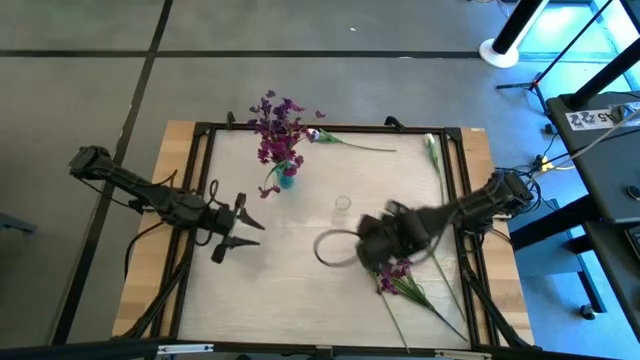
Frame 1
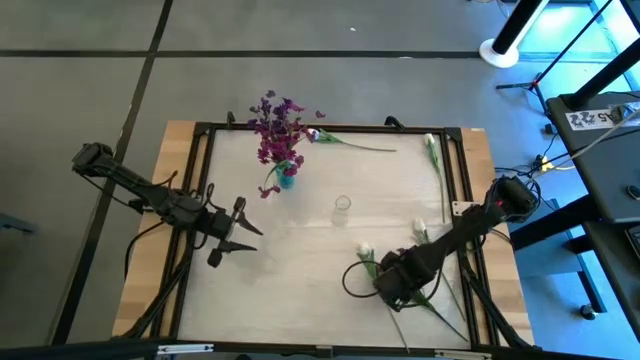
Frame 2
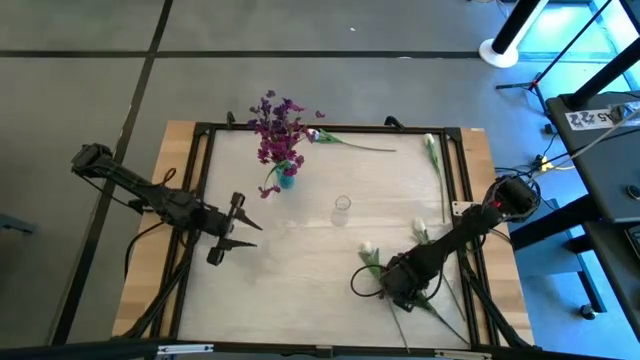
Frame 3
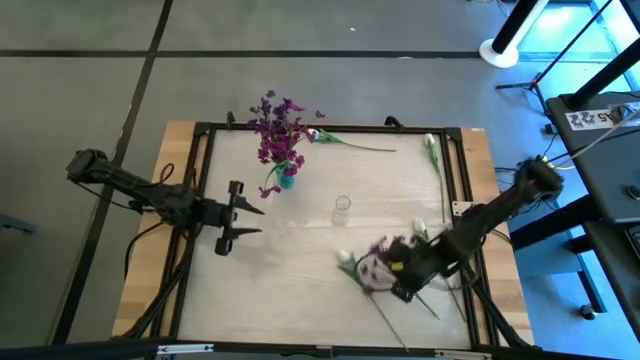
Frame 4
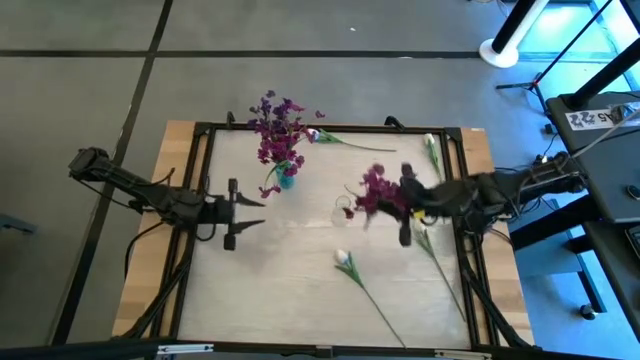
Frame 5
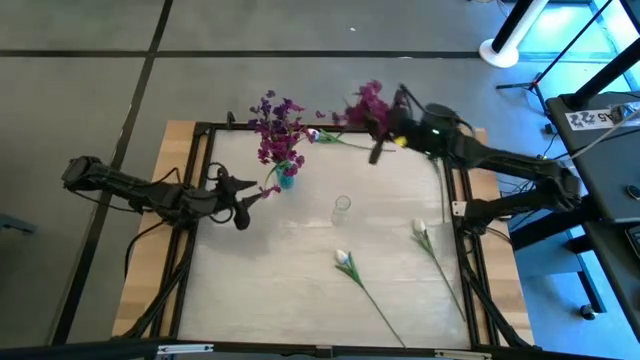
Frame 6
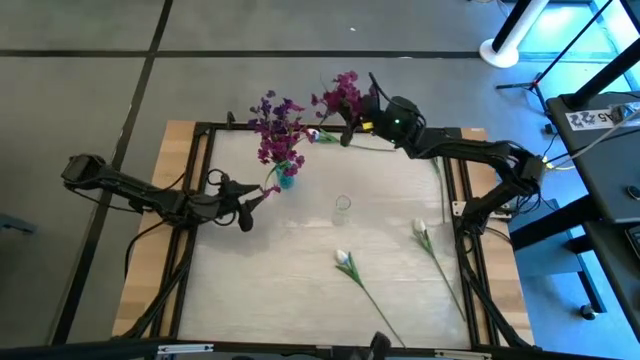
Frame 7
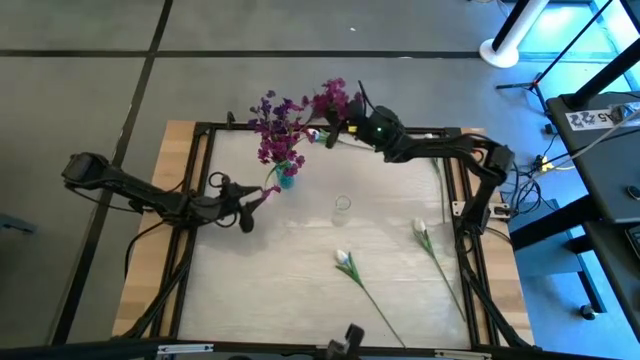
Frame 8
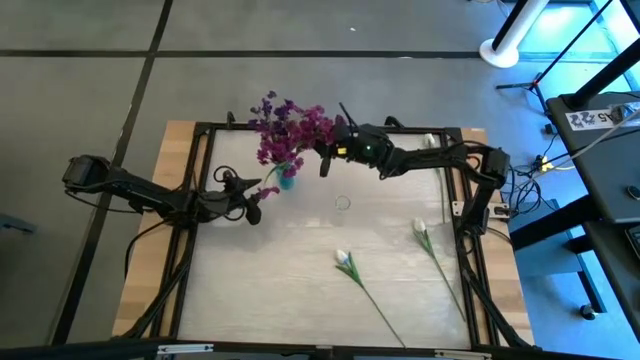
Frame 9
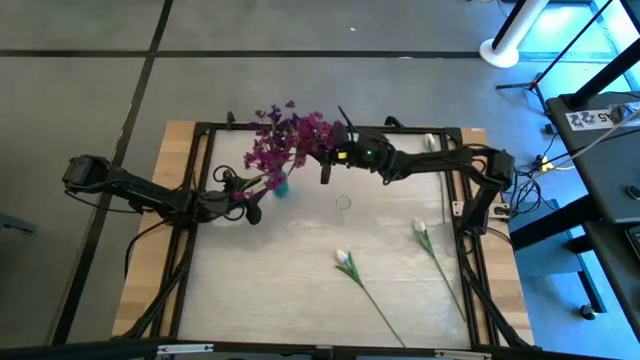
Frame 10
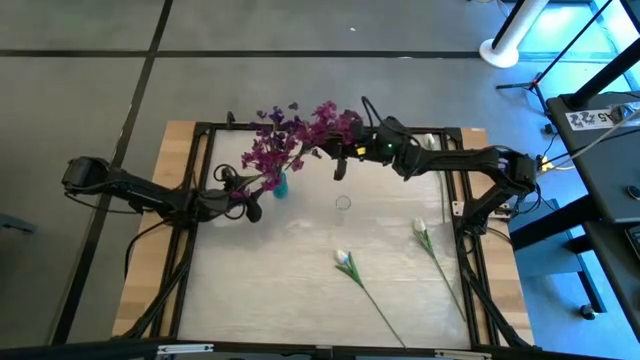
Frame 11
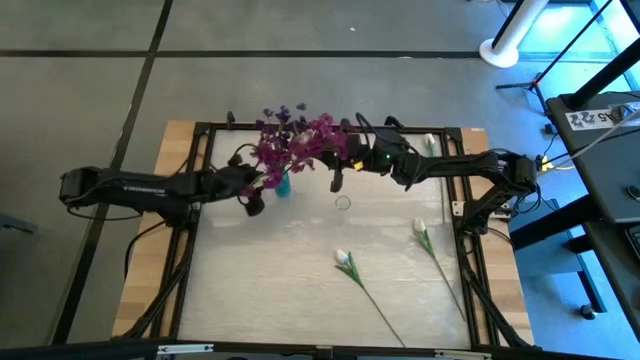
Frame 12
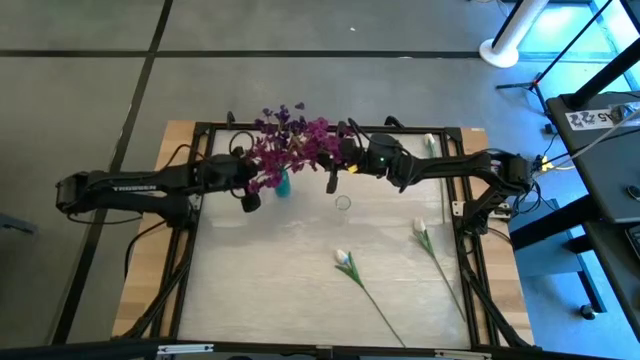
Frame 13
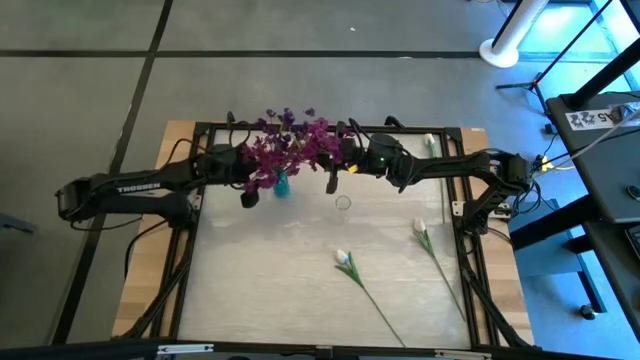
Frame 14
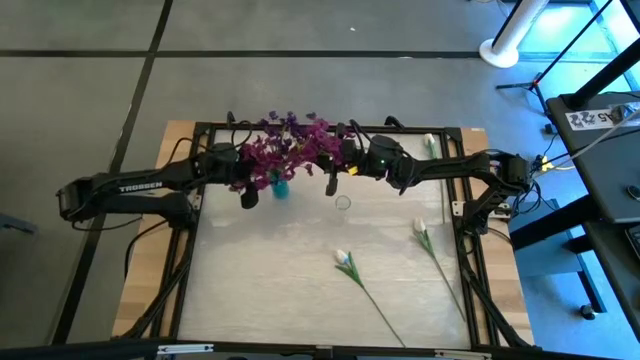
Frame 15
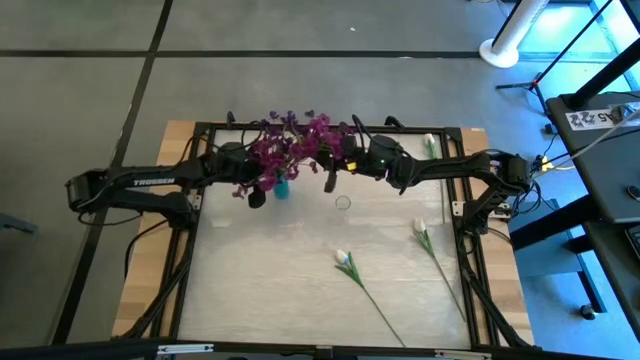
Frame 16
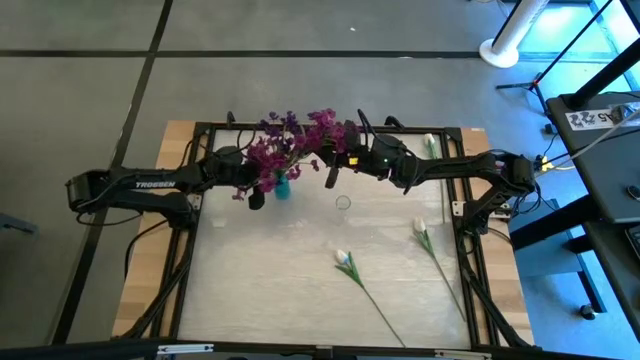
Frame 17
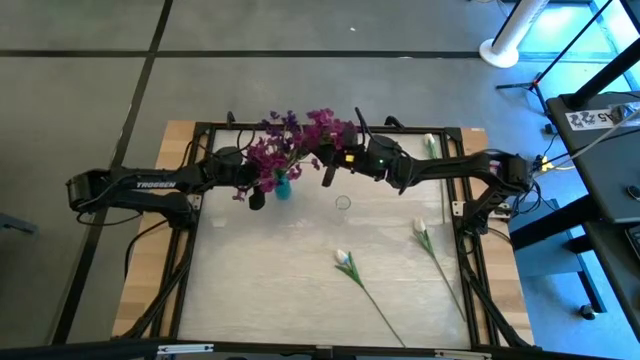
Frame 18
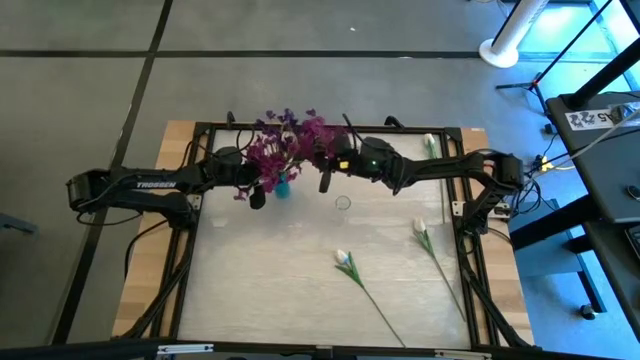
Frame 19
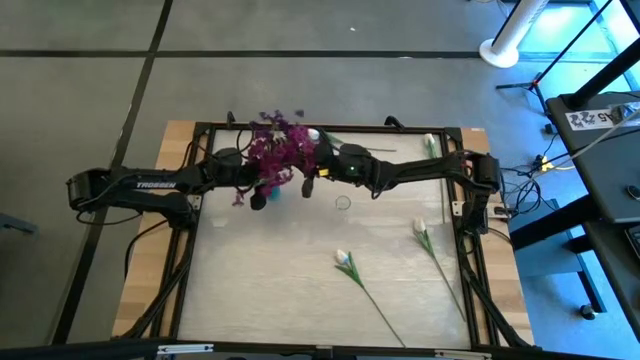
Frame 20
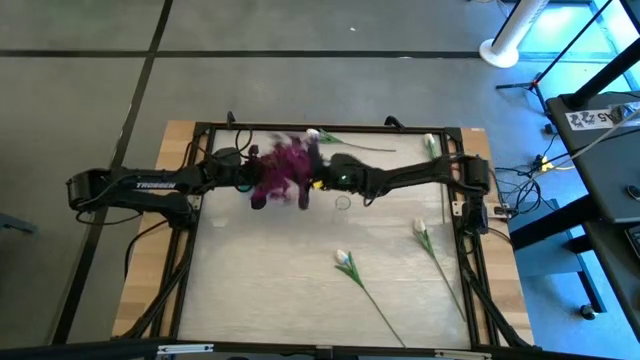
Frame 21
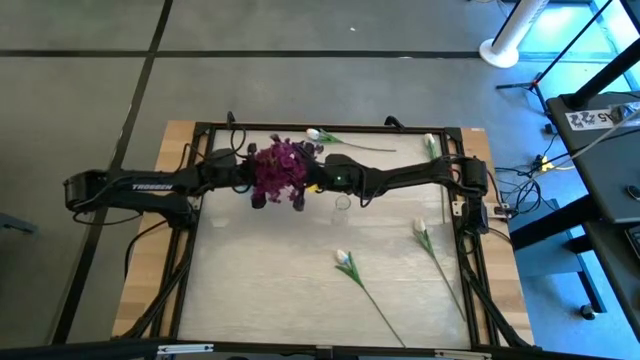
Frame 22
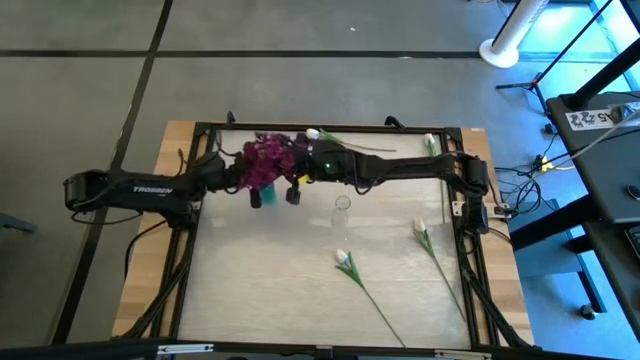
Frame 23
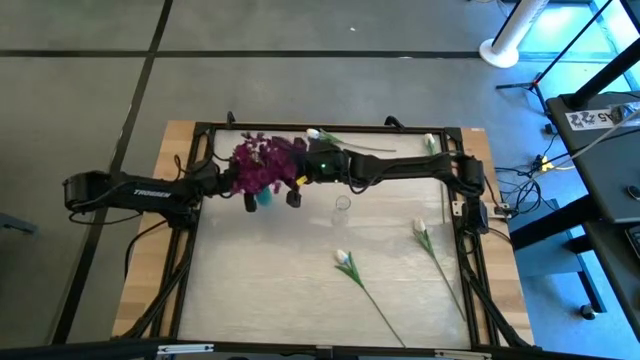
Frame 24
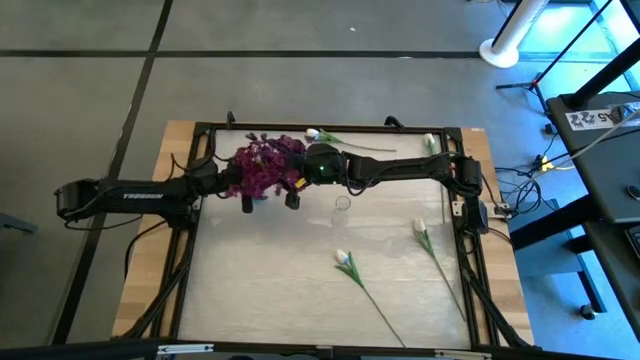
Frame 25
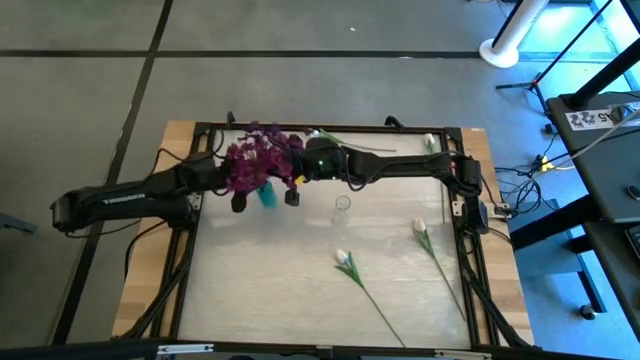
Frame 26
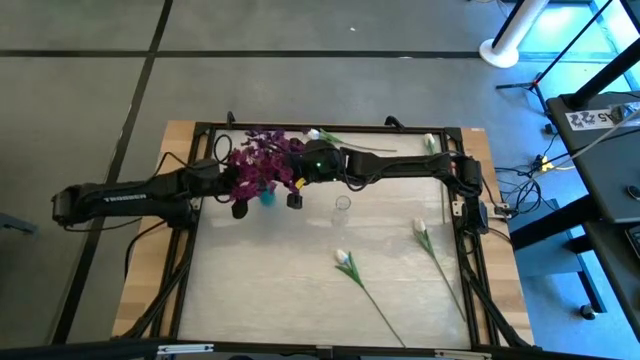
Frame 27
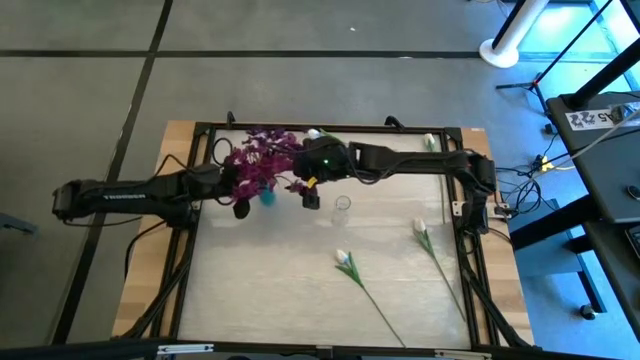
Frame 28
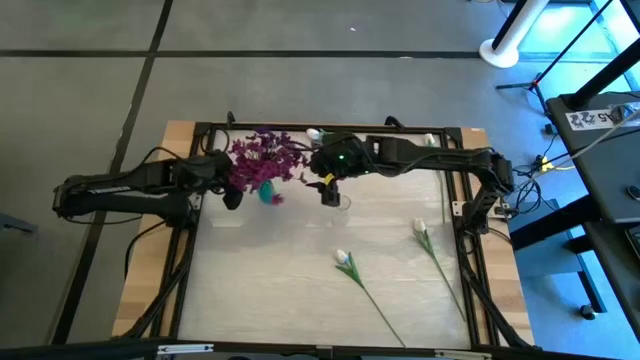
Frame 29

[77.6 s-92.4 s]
Task: Sort flowers into vase by color
Put the purple flowers into the blue flower vase

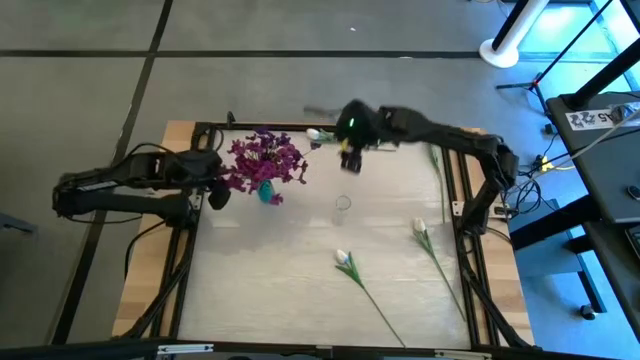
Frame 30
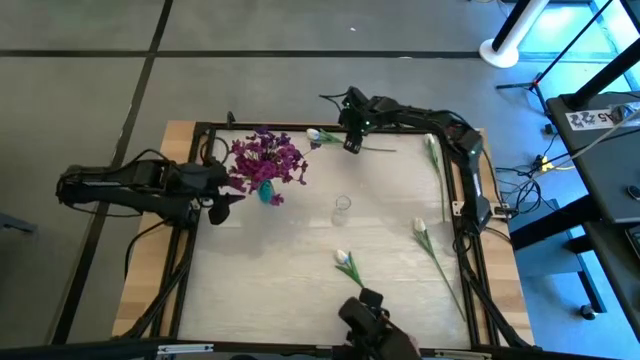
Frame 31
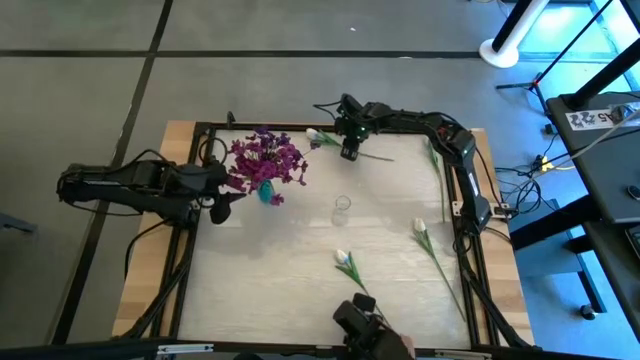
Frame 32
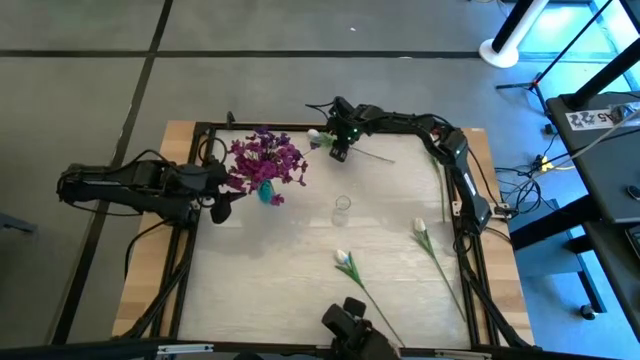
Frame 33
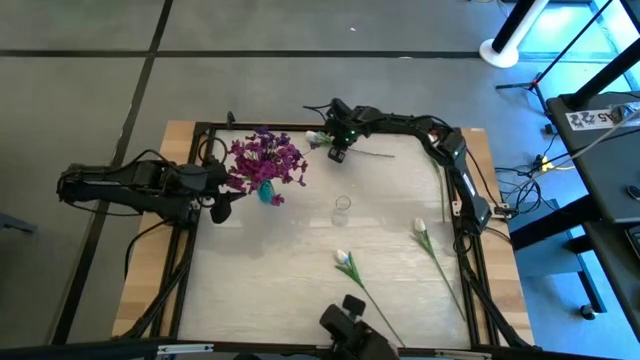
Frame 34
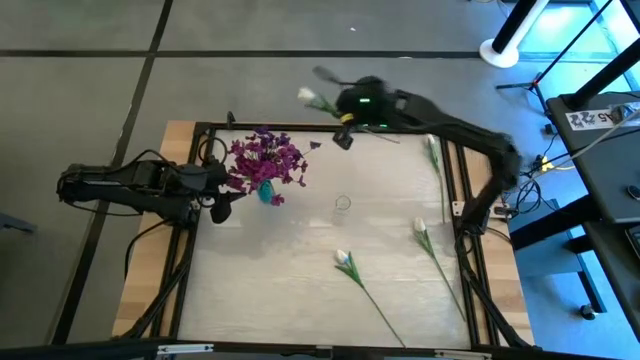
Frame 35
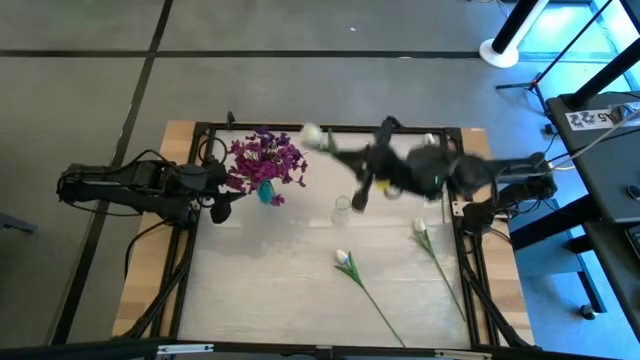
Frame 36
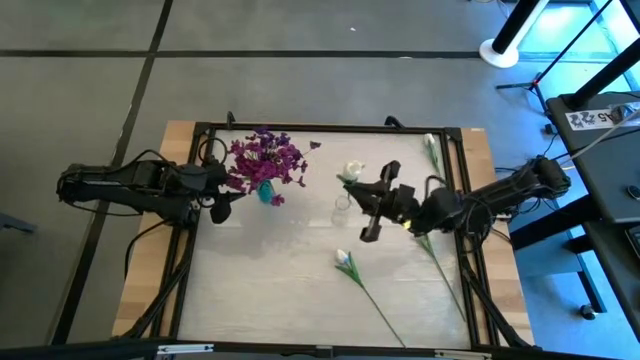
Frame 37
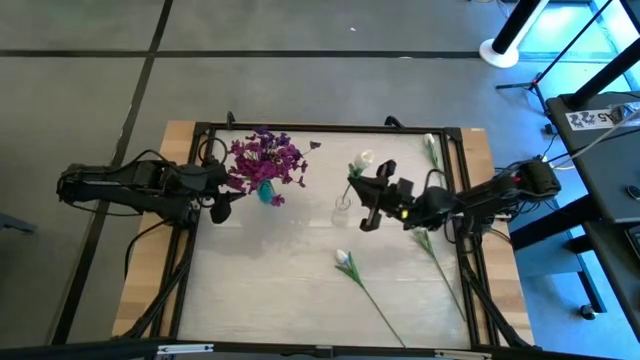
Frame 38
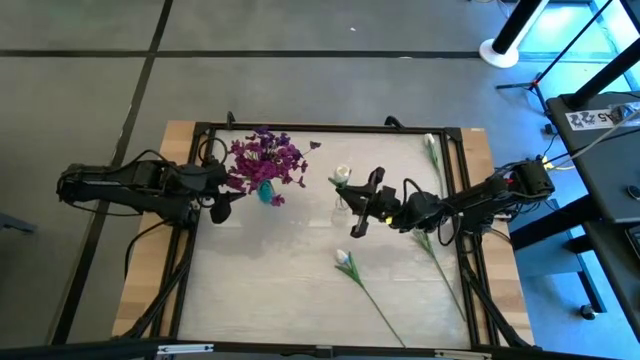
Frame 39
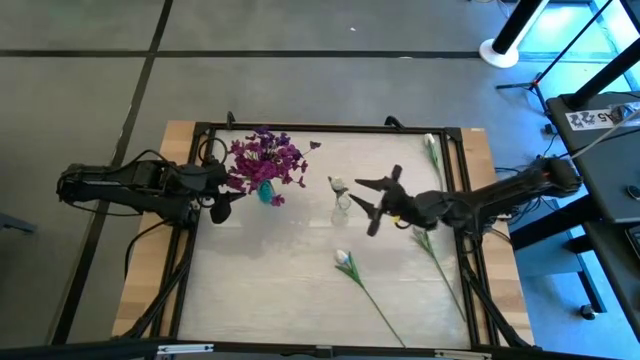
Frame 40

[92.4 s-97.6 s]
Put the top left white tulip into the transparent flower vase

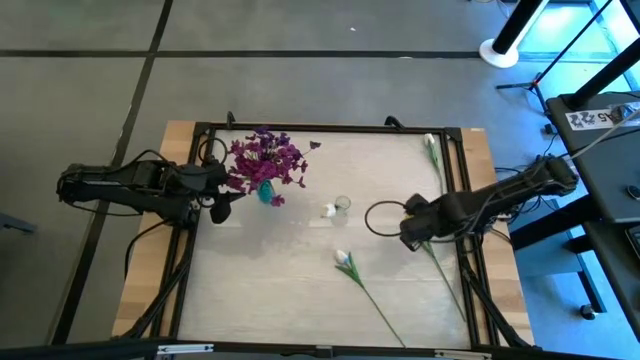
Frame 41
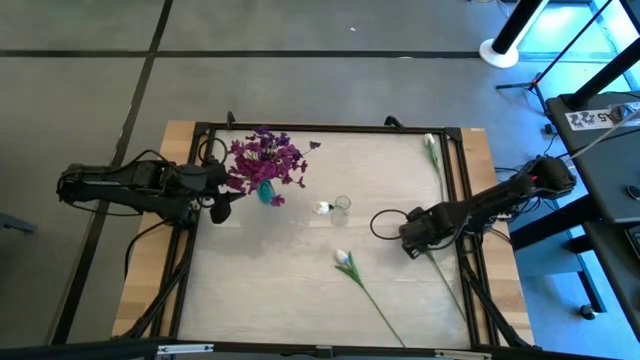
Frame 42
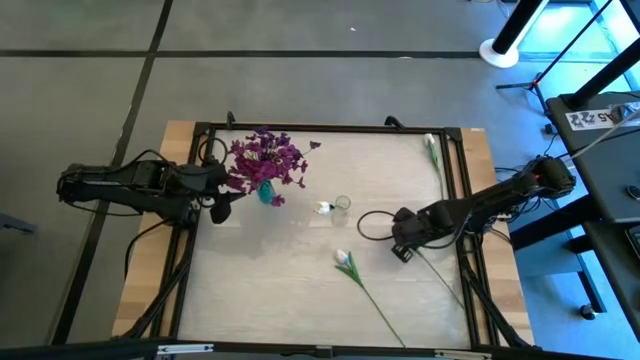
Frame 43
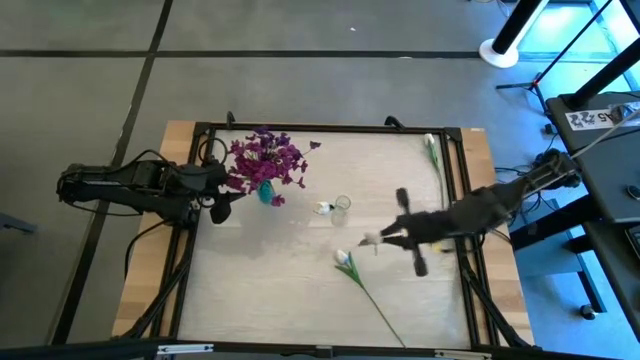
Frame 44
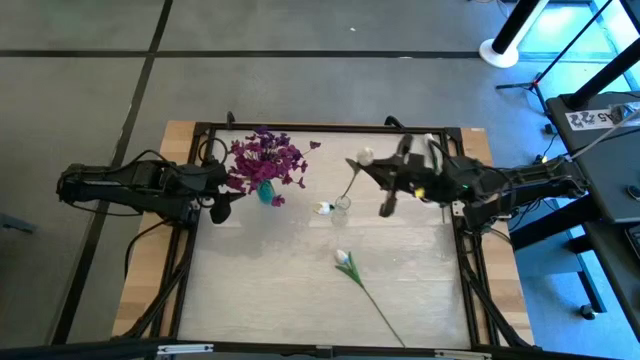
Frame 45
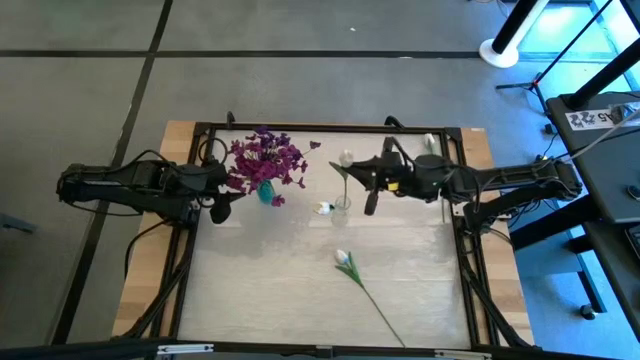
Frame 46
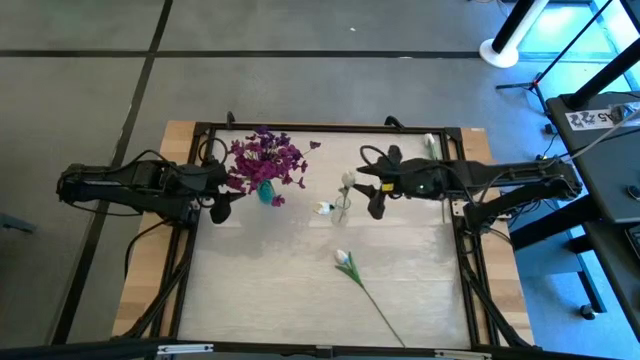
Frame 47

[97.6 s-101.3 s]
Put the bottom right white tulip into the transparent flower vase
